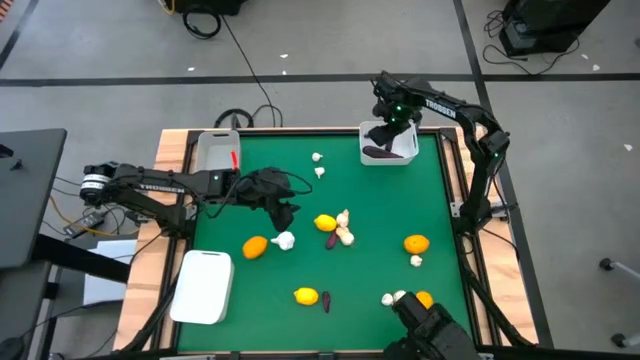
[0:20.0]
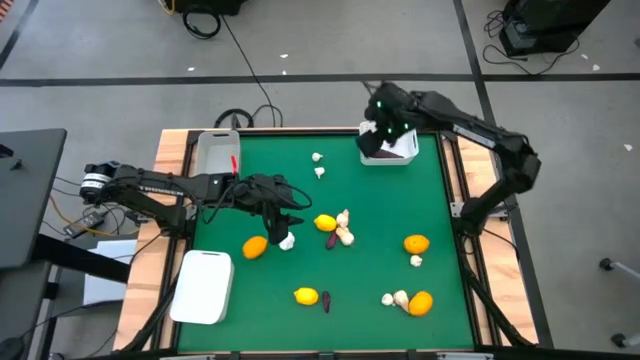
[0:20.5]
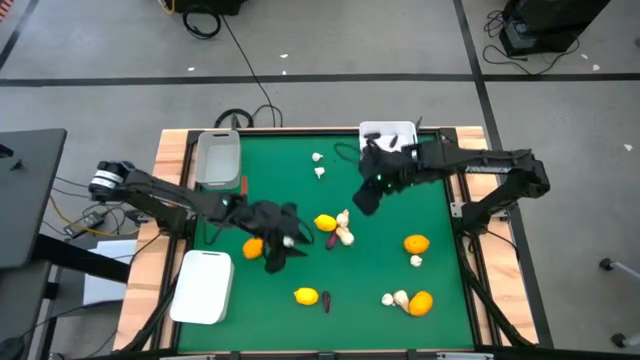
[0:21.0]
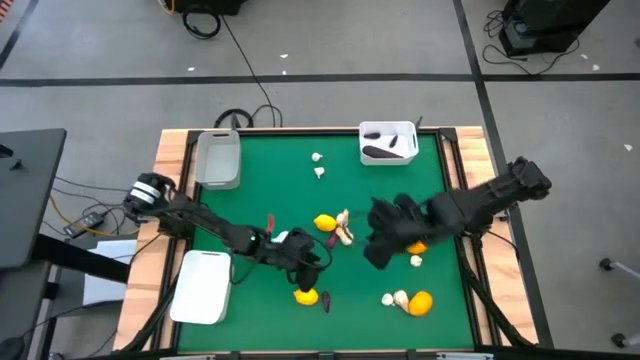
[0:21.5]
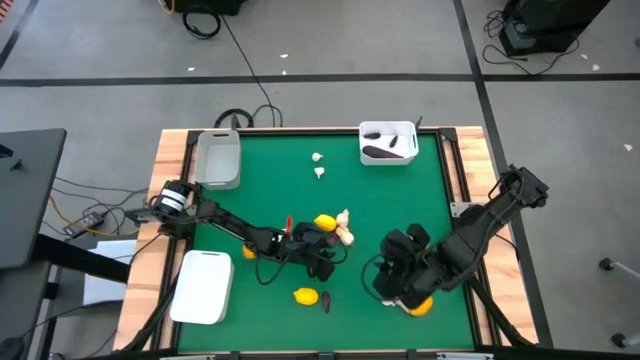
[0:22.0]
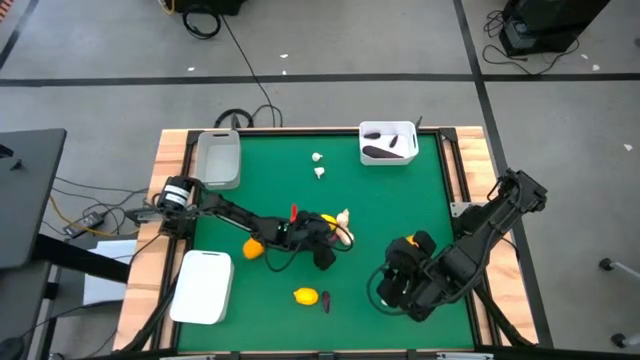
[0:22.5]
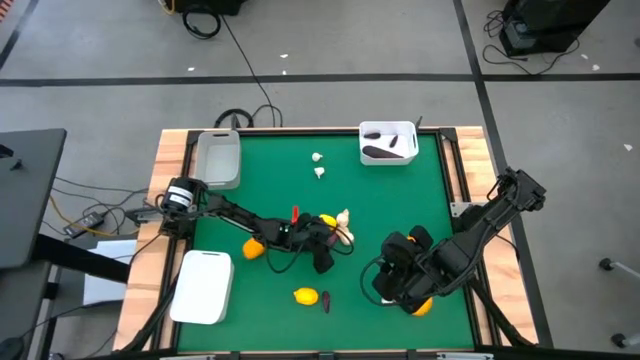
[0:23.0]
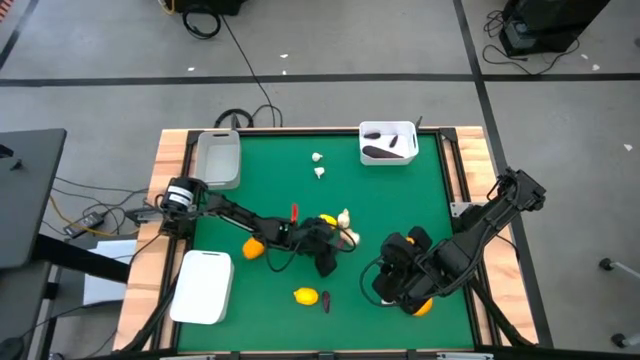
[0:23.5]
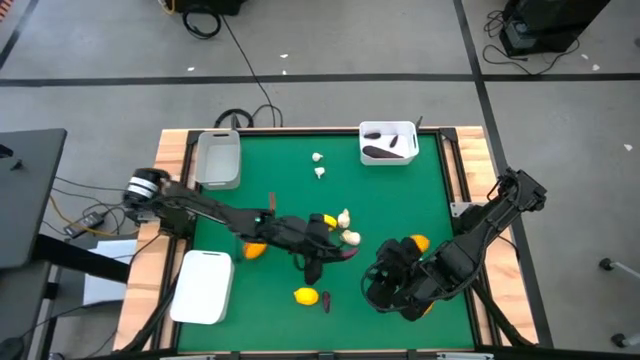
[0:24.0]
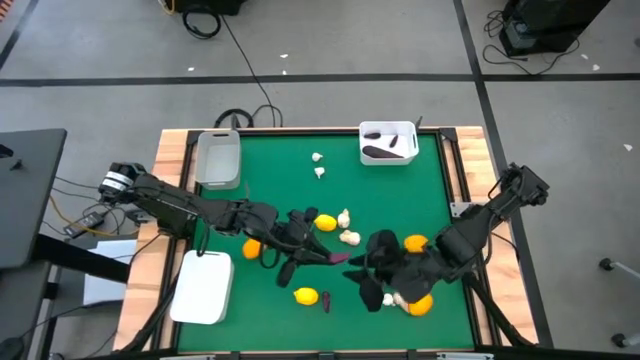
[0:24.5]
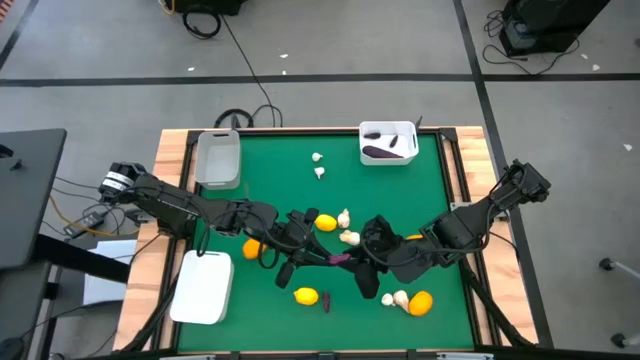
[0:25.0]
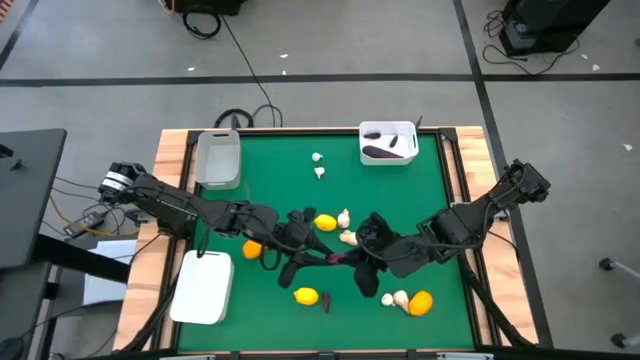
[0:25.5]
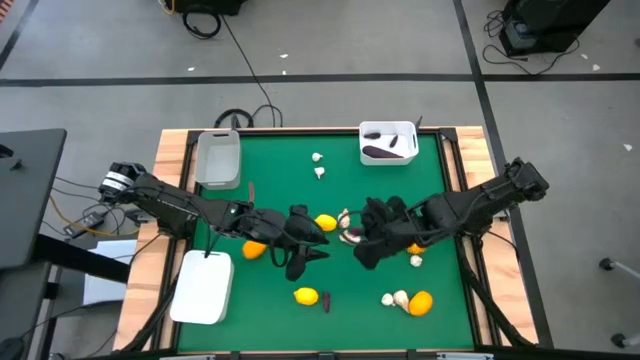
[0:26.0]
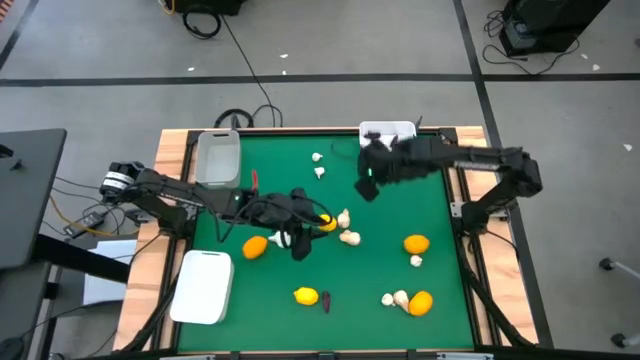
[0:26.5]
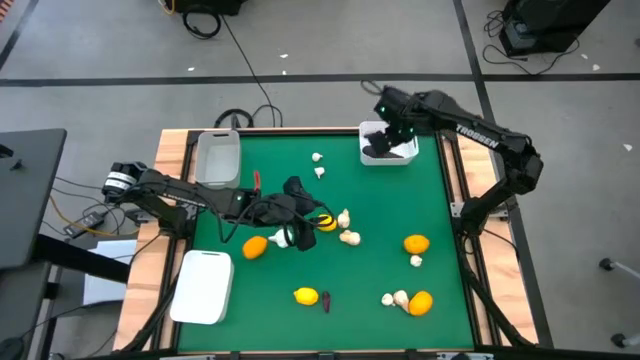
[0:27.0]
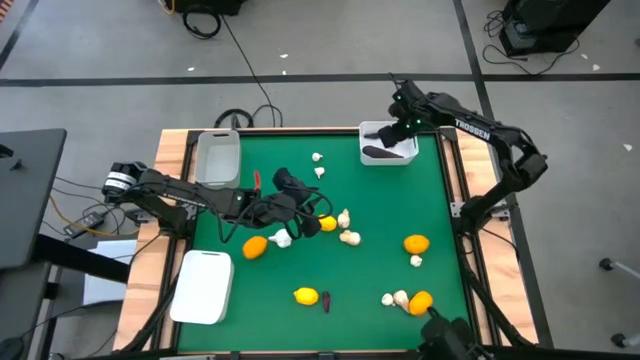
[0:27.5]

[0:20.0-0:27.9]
Task: Sort produce into baskets
Put the eggplant into the top white bin

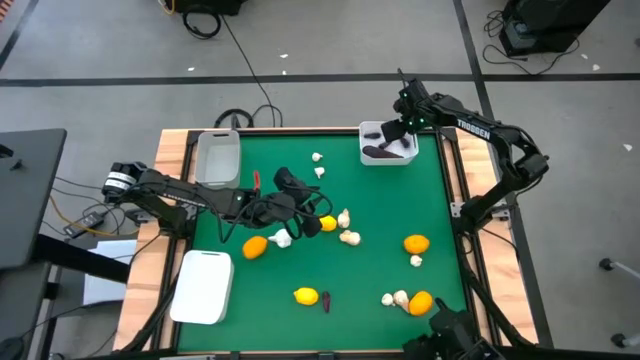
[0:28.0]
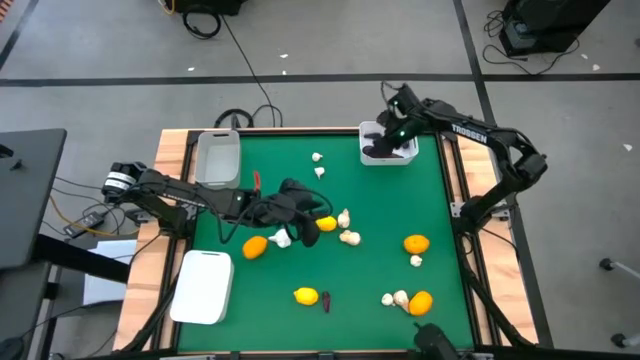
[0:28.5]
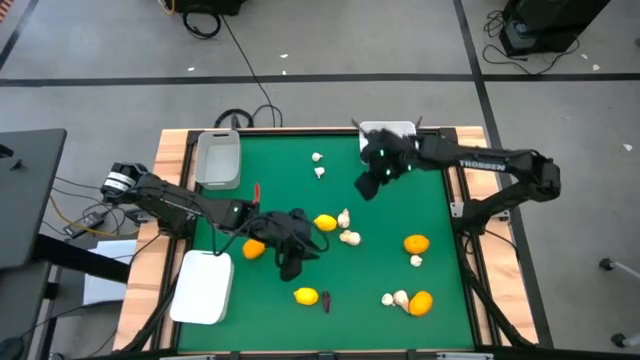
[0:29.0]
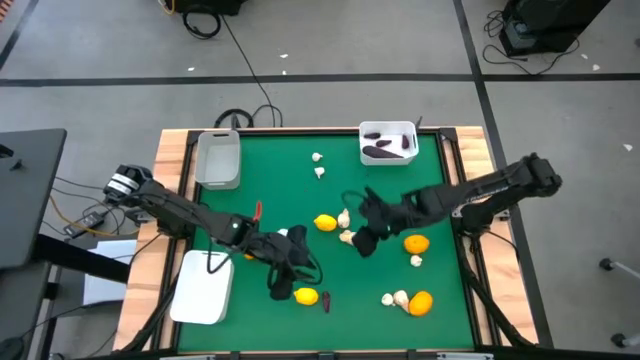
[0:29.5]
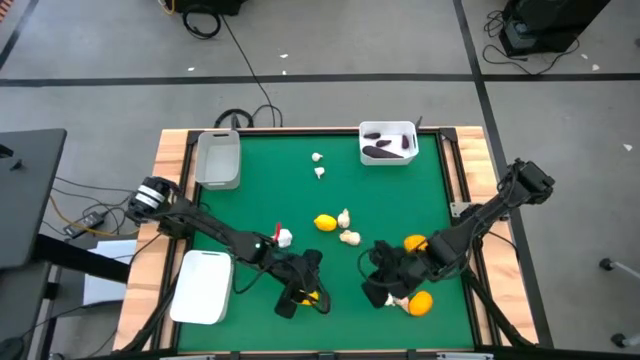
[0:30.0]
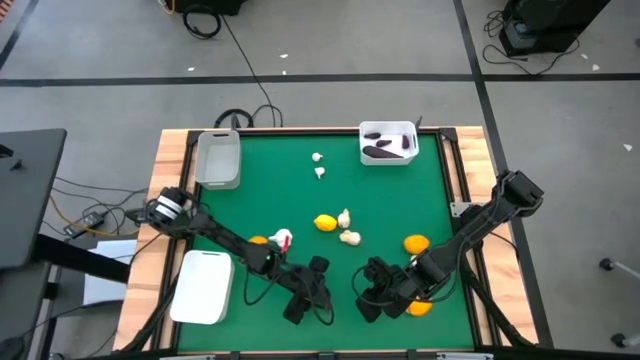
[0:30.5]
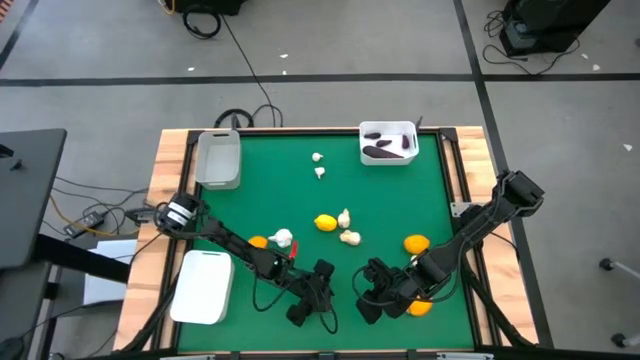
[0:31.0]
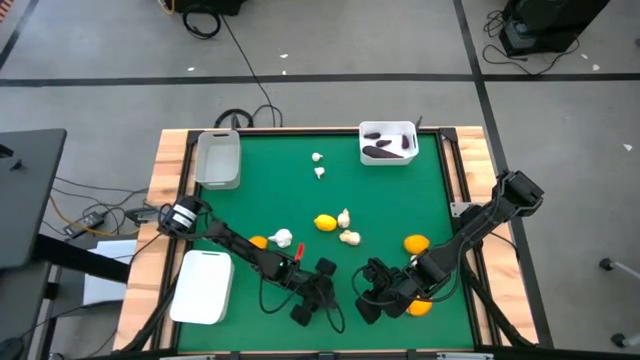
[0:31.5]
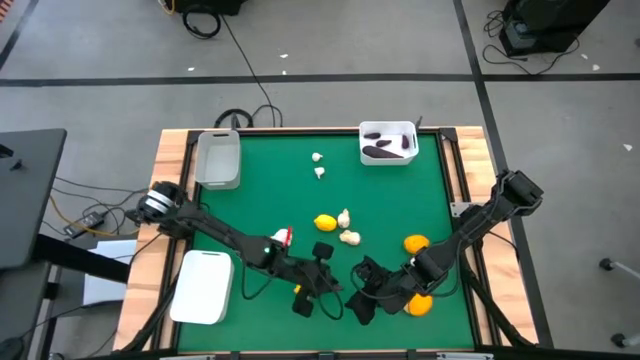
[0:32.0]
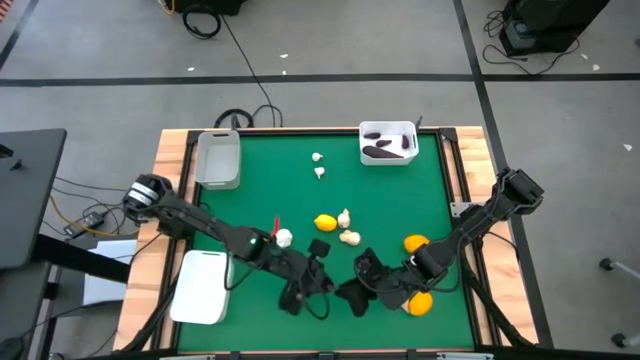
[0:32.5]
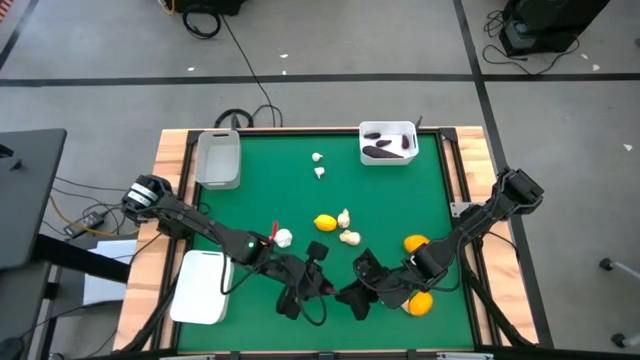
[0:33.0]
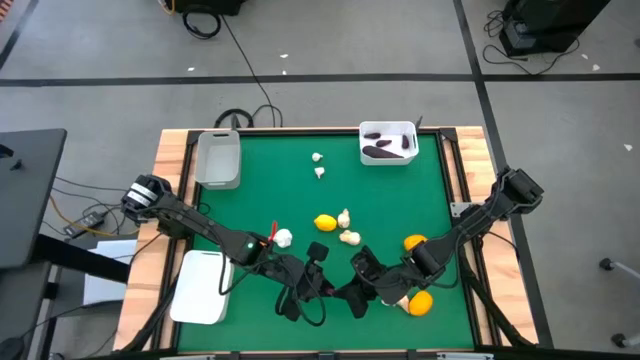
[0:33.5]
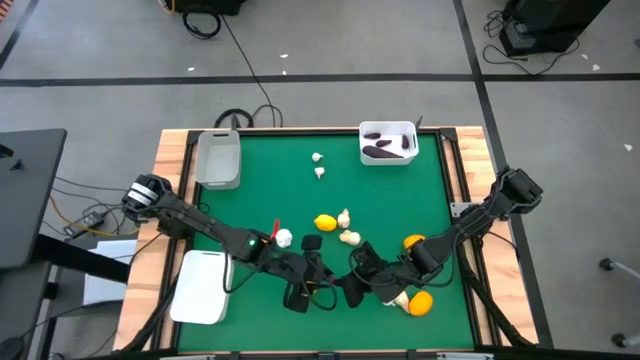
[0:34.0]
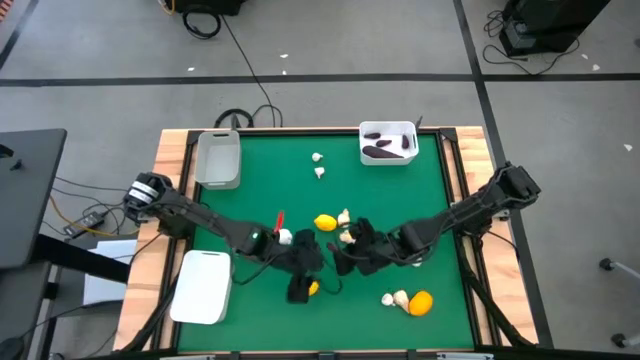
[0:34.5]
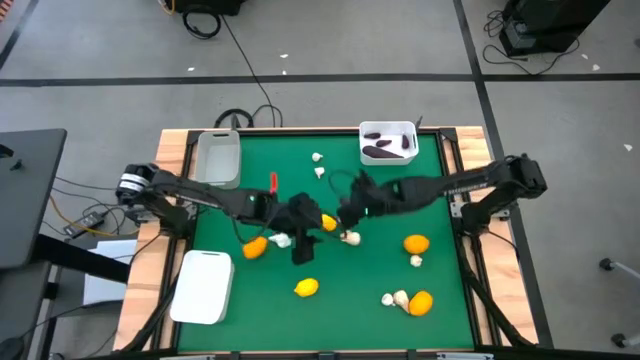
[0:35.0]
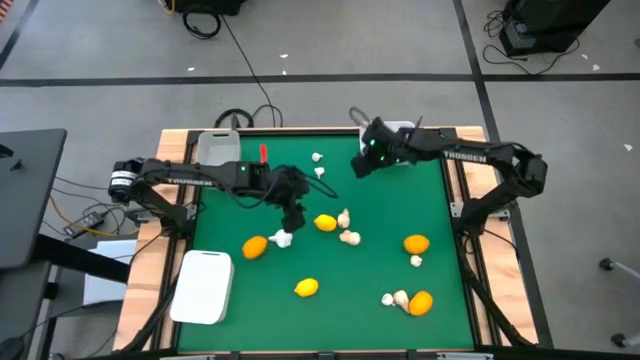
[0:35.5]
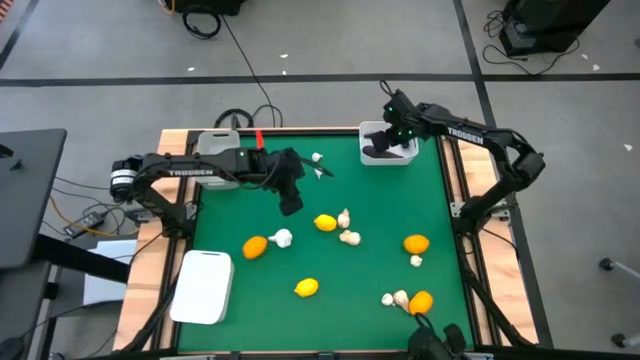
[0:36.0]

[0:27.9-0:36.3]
Put the eggplant into the top white bin

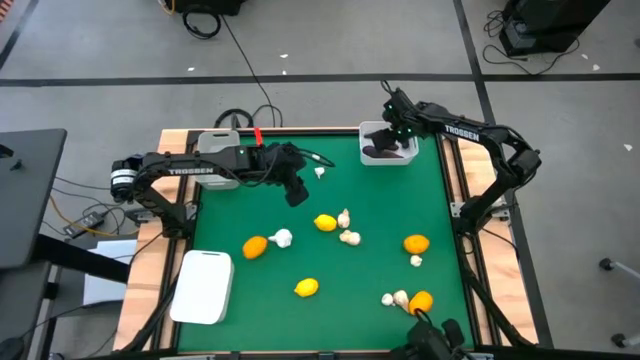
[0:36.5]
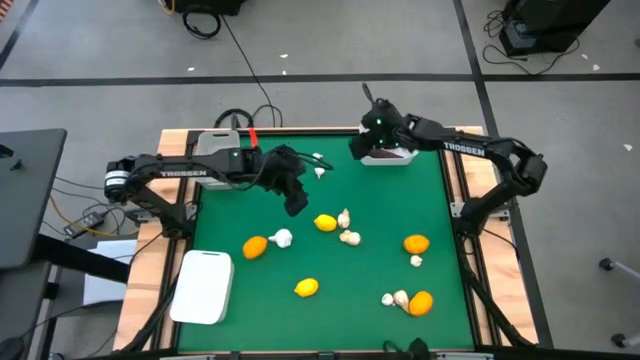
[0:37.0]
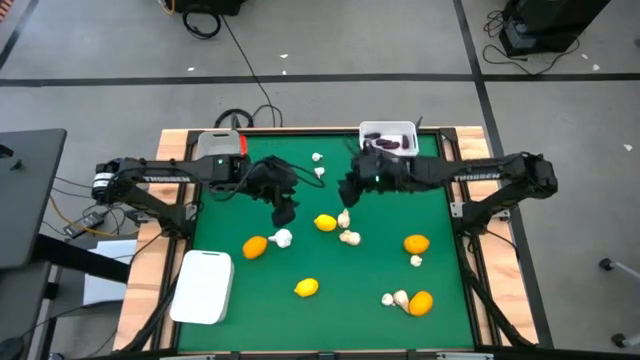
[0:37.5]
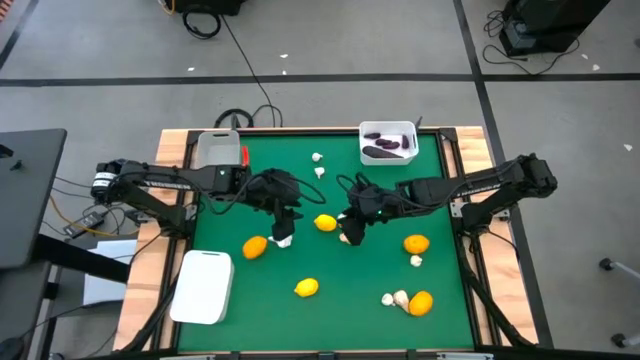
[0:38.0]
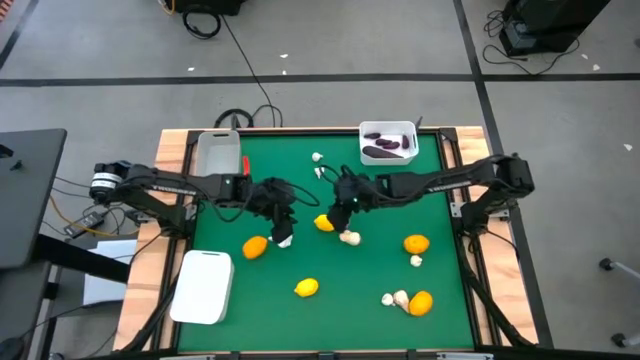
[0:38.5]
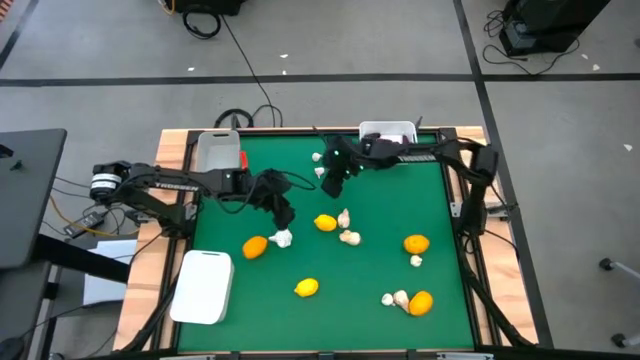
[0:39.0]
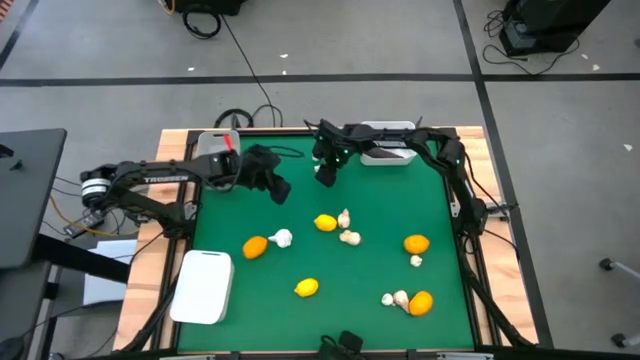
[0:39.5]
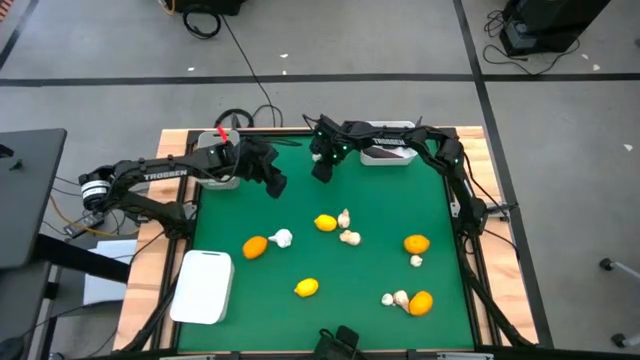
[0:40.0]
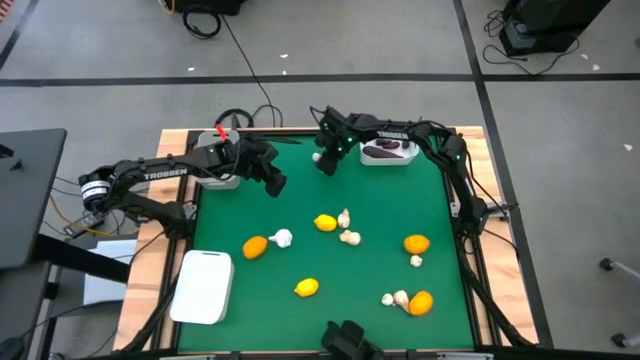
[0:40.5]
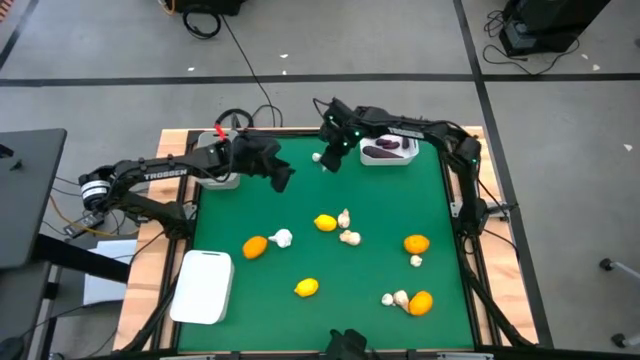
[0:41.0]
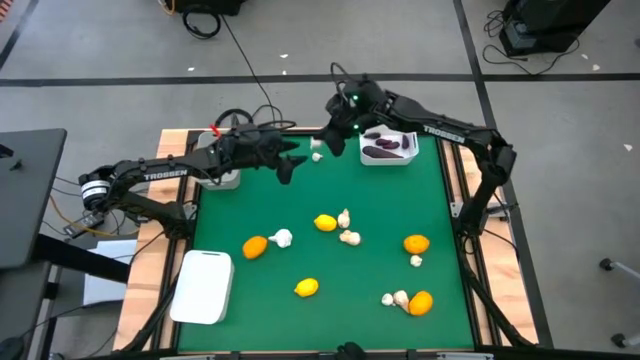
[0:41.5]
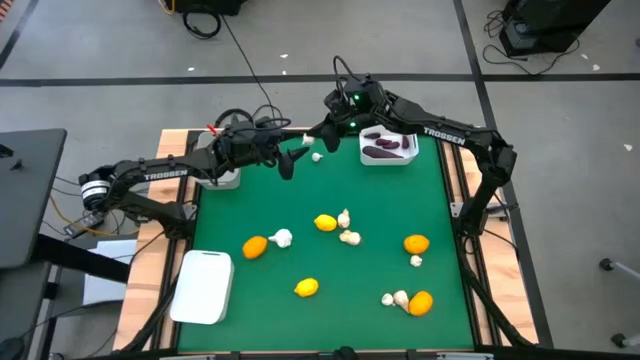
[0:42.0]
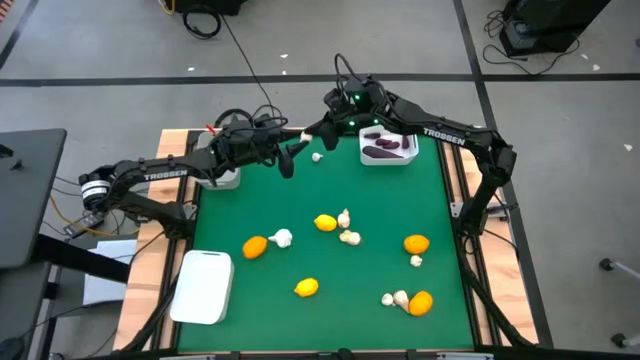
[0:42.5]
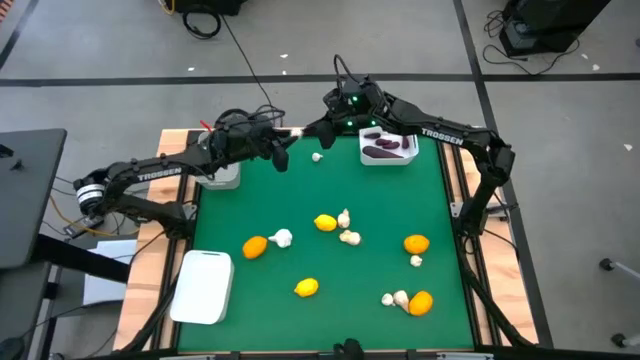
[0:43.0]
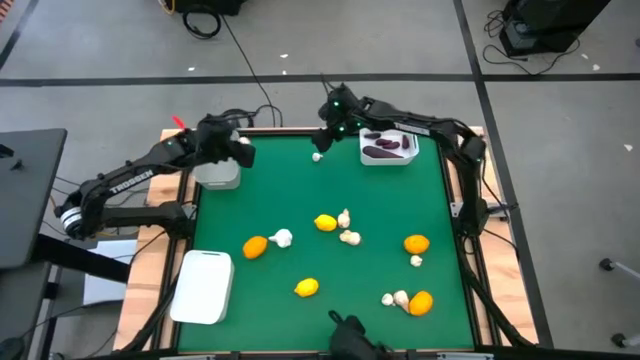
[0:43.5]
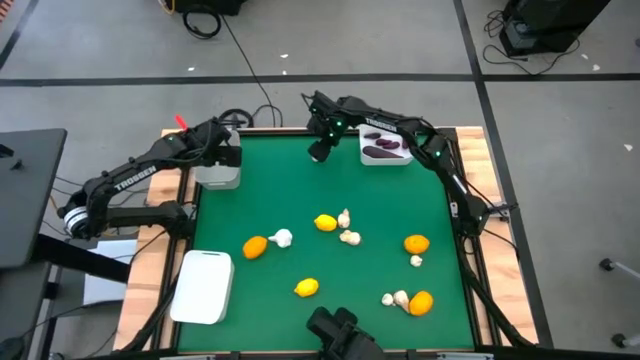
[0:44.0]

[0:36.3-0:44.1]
Put the garlic into the gray bin
